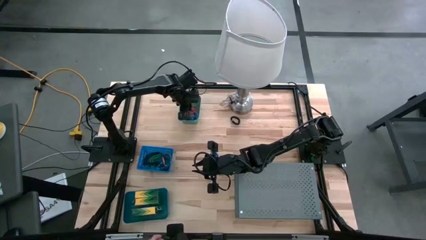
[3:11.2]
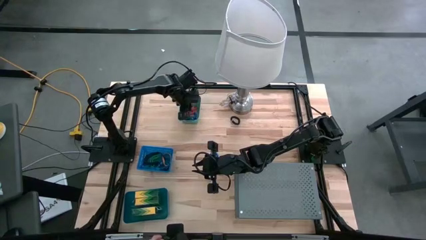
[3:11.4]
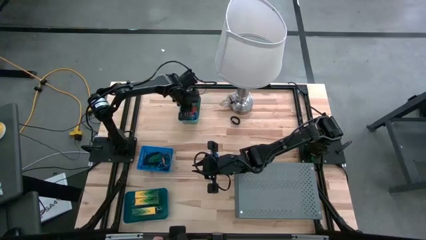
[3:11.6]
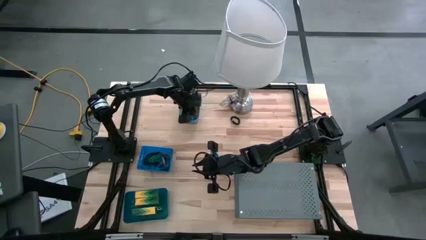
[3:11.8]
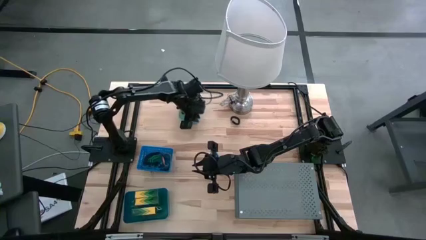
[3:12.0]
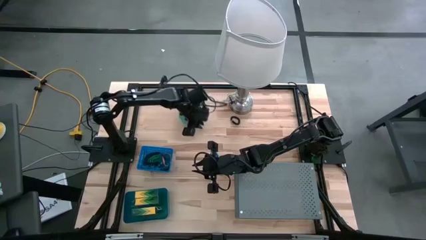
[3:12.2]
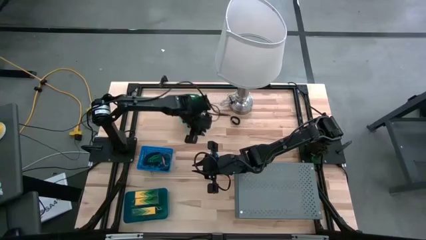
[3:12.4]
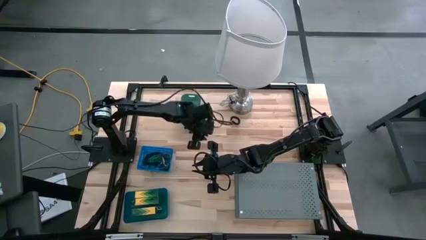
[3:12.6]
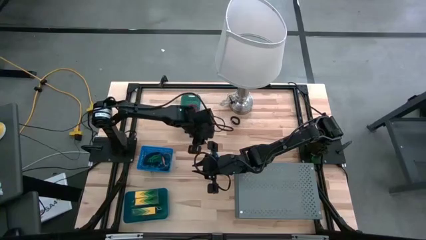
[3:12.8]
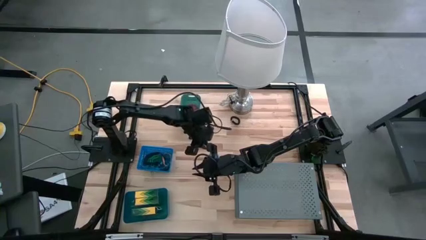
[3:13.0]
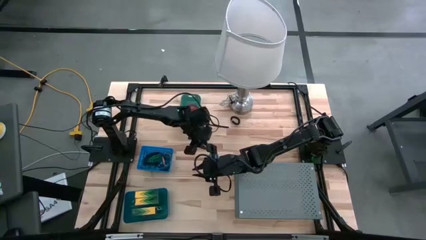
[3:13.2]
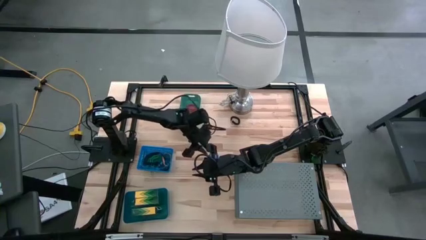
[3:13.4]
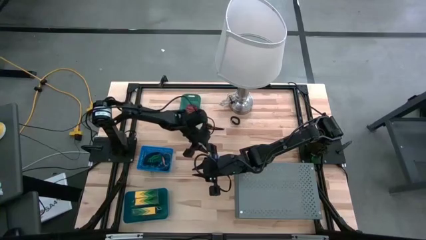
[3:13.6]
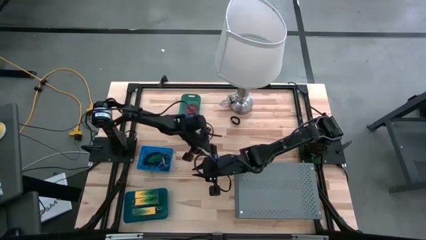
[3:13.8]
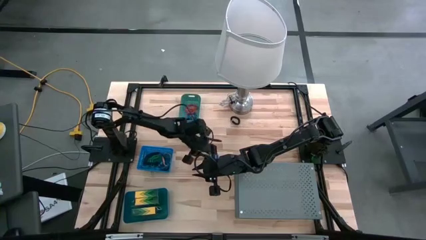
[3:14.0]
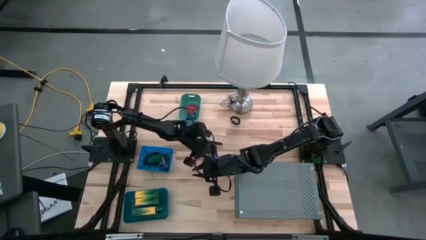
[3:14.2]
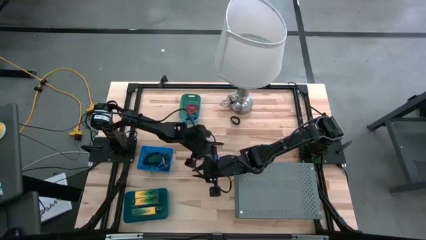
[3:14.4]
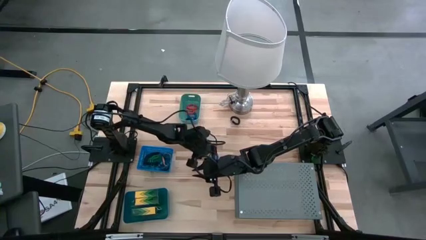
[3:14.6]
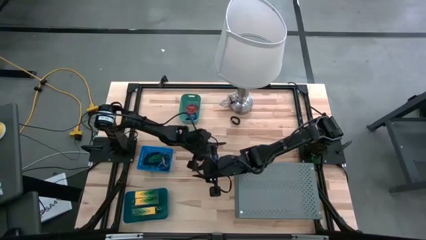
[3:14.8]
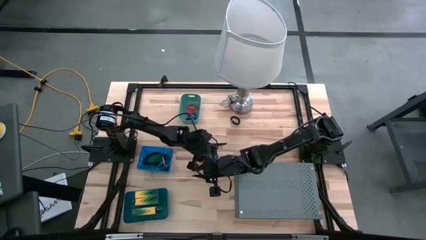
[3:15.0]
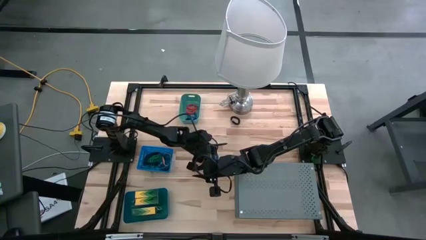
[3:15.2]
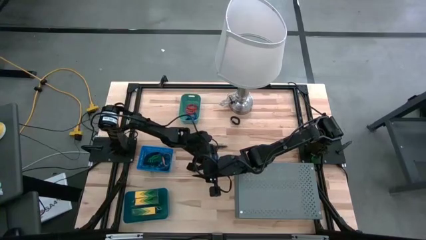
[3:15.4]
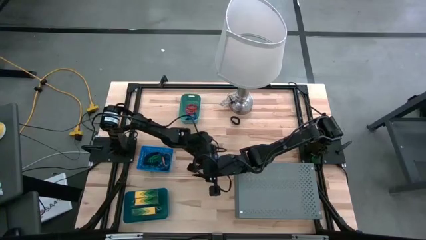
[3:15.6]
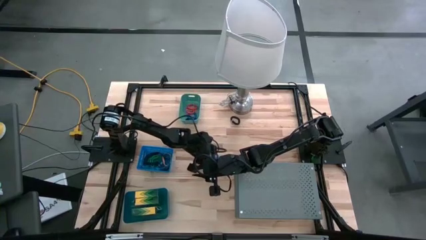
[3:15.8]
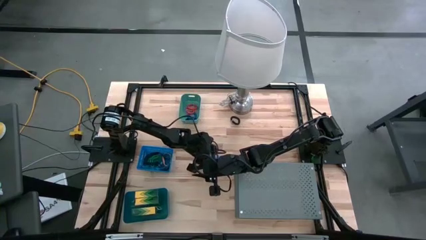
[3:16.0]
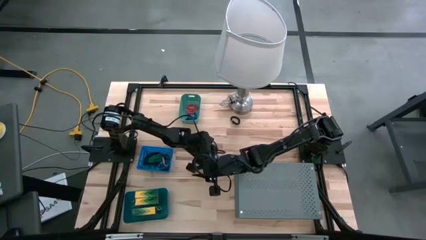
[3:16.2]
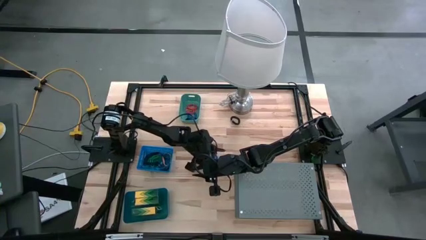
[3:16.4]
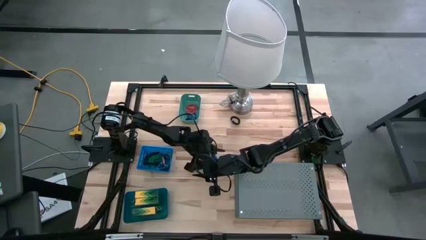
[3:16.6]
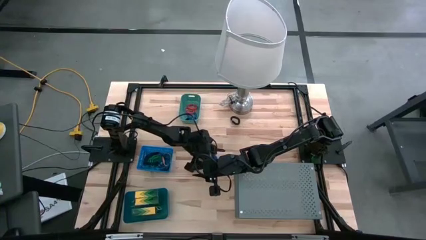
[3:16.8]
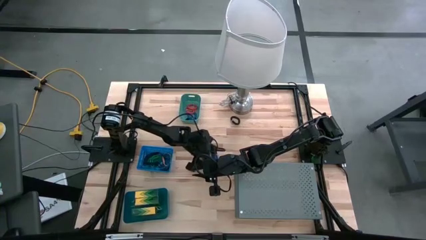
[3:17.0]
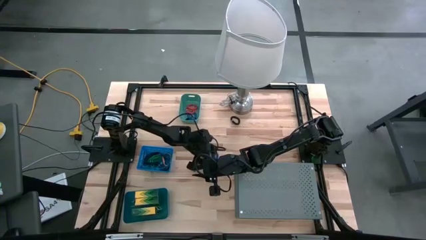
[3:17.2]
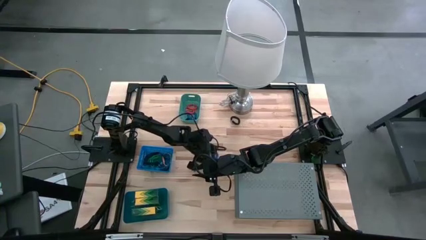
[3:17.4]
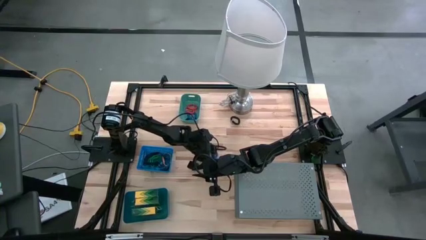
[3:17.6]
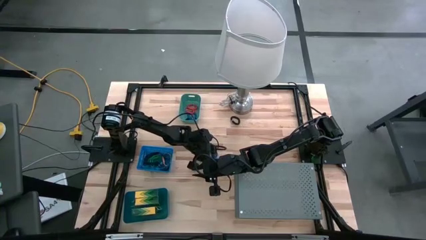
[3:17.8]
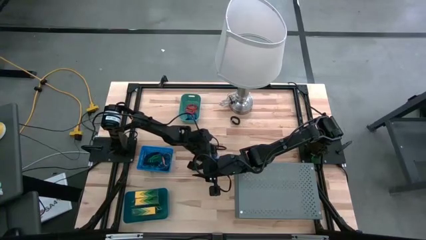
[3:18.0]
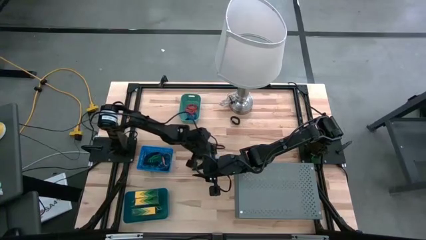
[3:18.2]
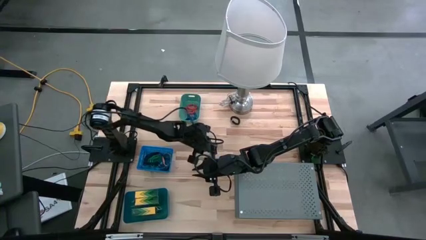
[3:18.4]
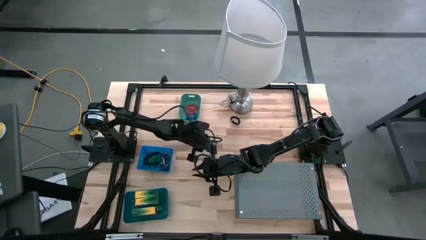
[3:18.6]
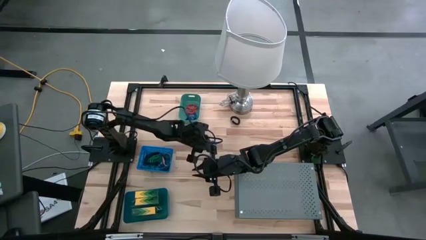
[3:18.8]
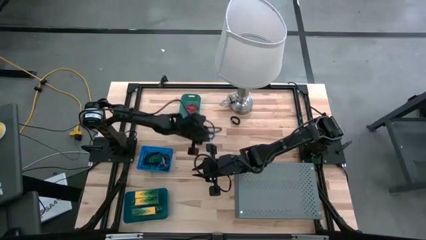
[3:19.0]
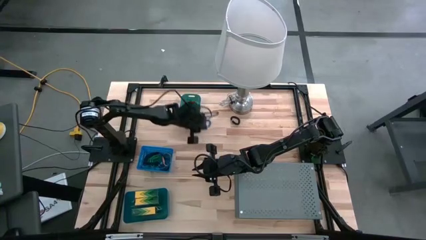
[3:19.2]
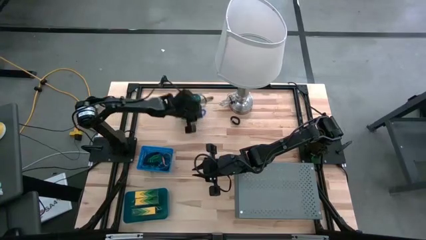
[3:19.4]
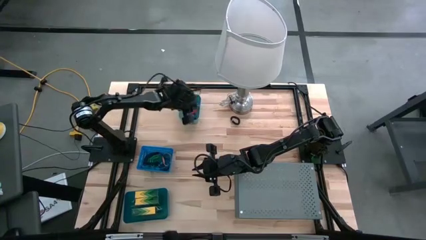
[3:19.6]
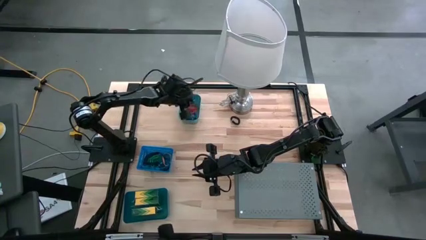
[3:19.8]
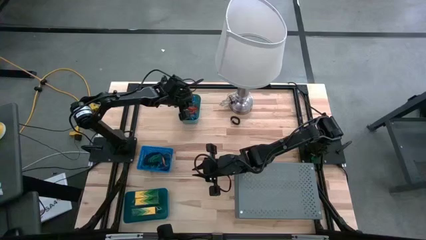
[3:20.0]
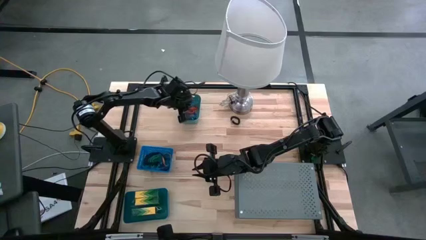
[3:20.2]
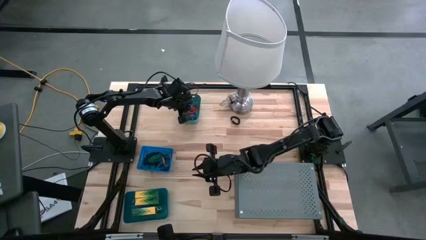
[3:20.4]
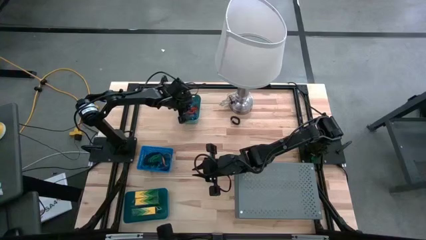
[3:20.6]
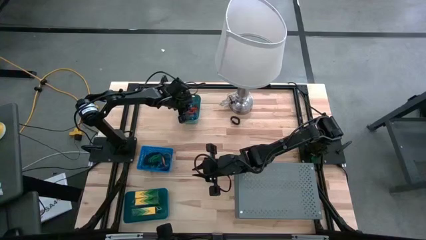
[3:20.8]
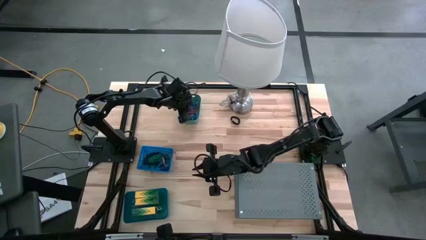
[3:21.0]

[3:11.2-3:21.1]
Task: Pick & Place Office Desk Supplies
Put the blue spring rubberband into the green bin

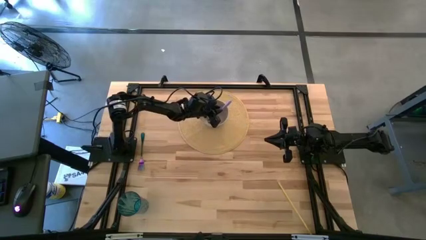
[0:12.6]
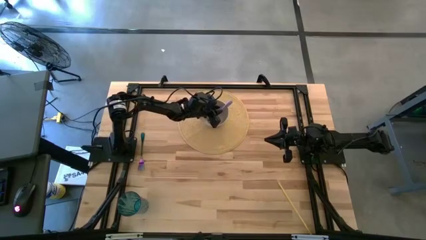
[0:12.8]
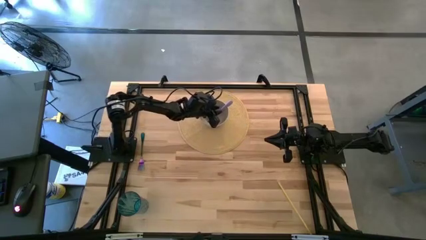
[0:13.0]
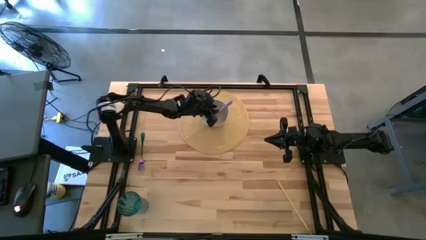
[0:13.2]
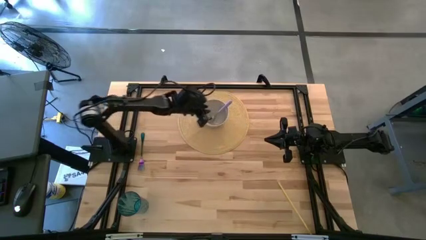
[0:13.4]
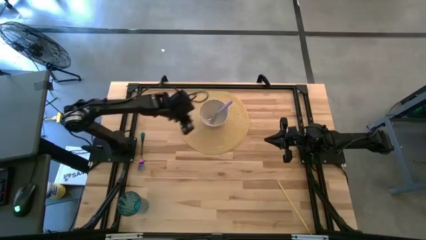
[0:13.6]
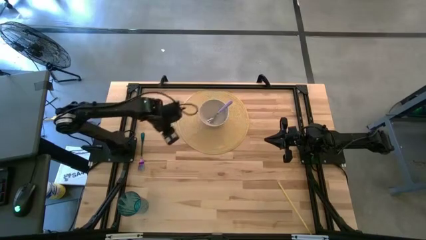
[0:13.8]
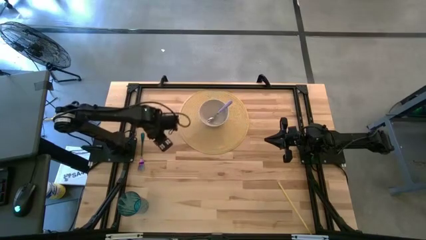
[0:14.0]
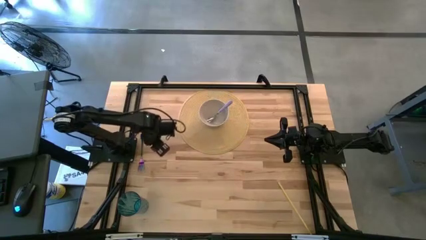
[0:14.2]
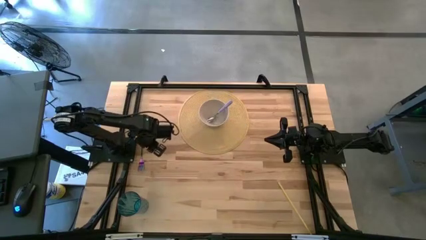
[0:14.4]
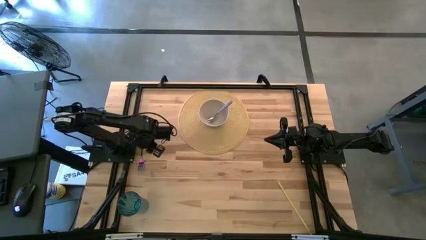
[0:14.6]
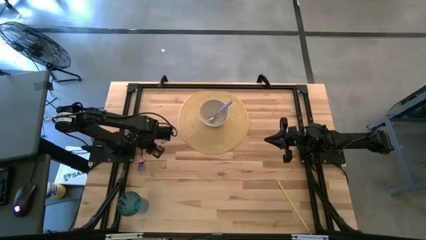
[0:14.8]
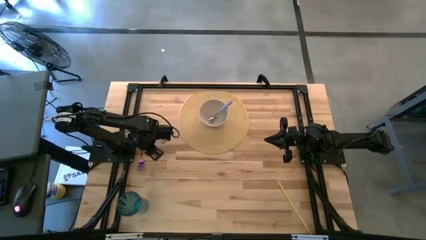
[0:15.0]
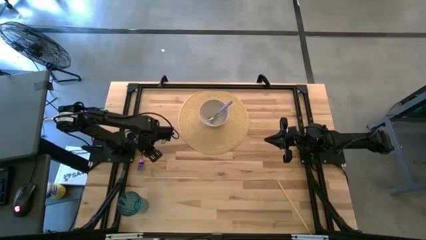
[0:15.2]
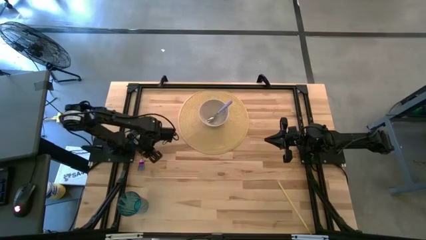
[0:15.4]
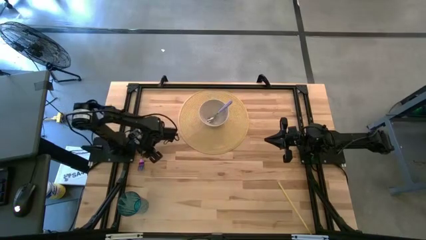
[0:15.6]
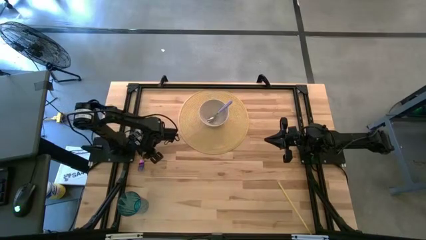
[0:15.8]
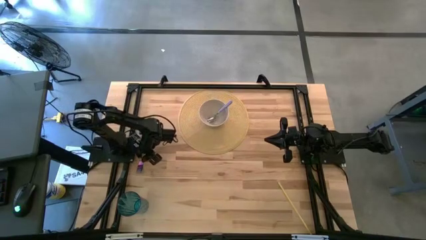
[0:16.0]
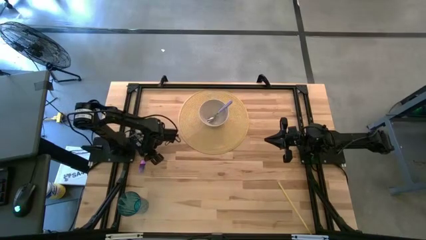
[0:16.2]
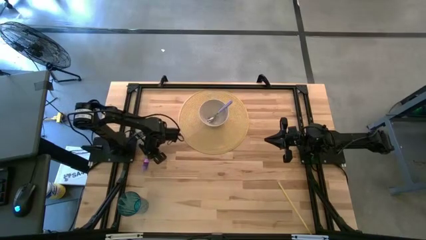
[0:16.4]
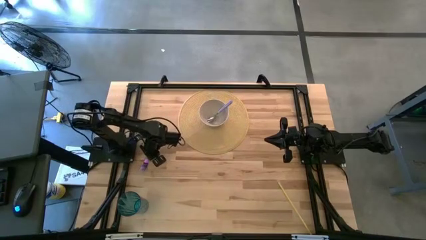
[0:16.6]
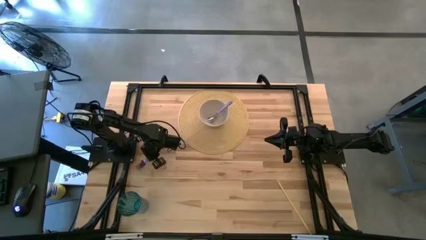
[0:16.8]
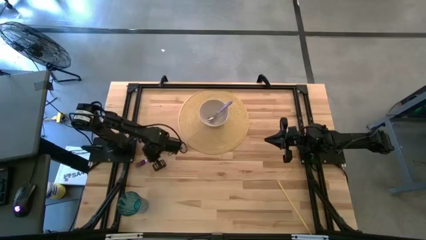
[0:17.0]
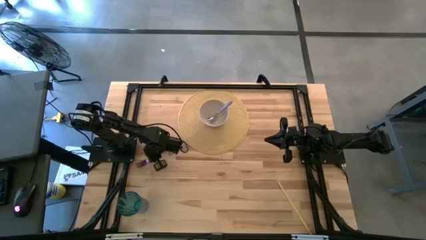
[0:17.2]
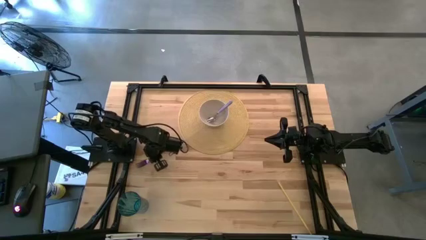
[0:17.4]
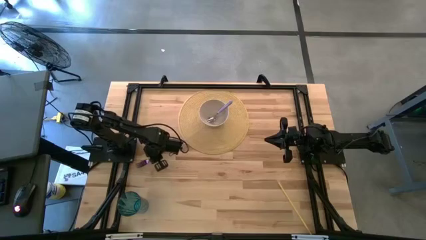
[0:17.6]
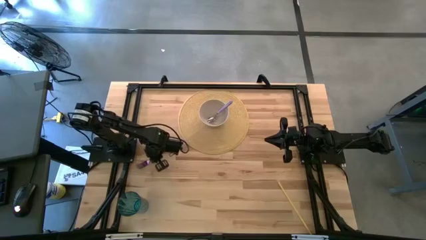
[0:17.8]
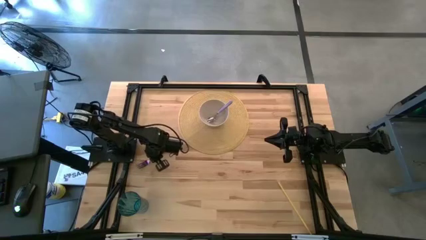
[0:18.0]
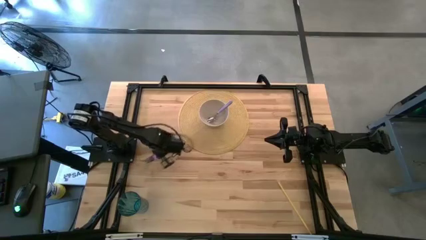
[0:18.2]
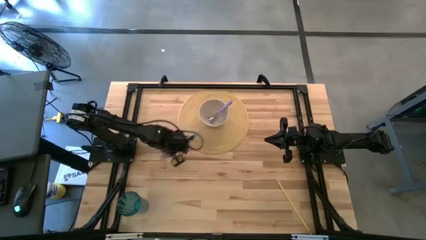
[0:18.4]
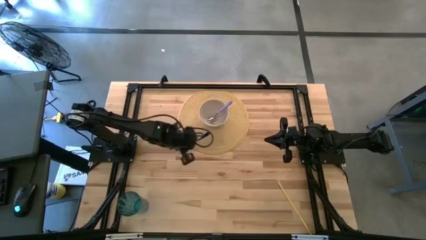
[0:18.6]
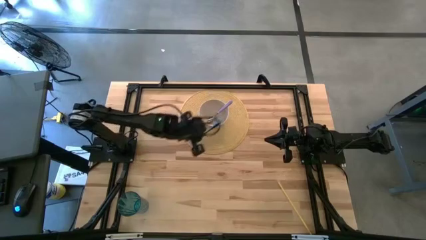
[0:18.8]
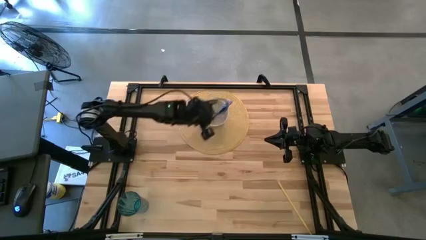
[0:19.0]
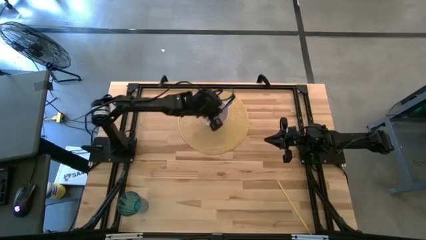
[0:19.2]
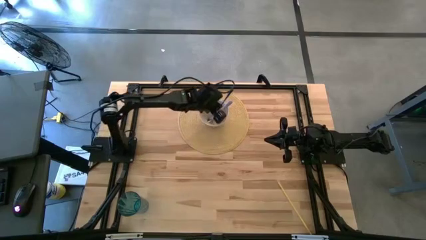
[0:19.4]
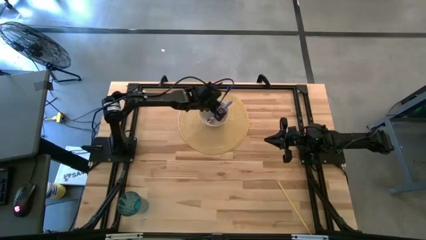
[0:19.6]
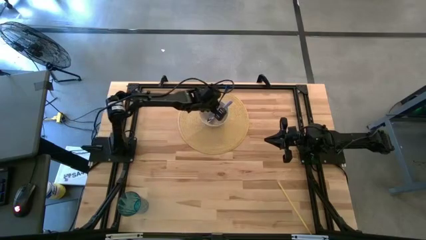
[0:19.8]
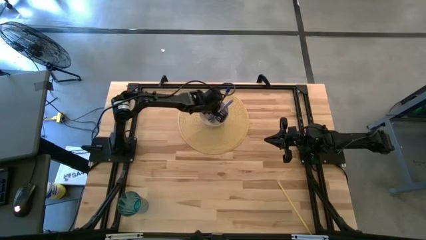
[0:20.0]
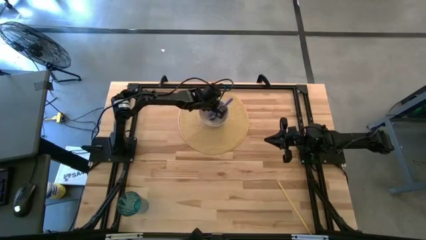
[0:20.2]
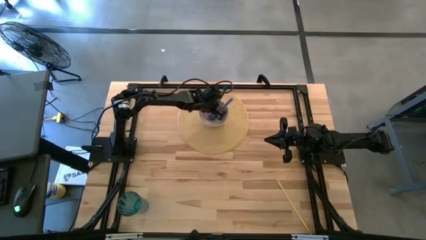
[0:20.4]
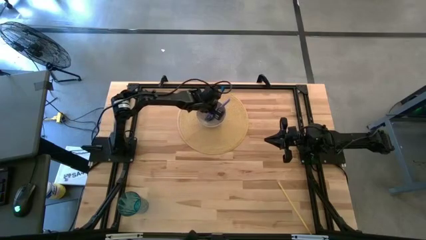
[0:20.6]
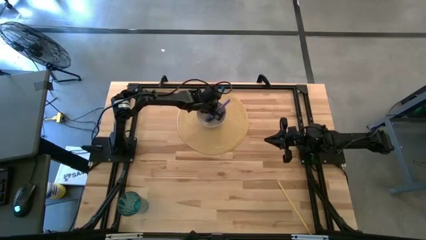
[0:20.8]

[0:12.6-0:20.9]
Task: Pick & Place Utensil
Put the purple fork into the white bowl
